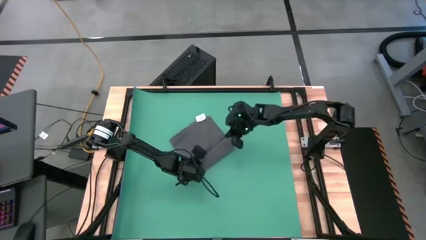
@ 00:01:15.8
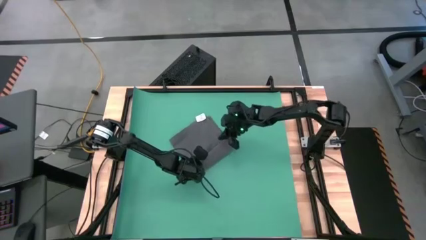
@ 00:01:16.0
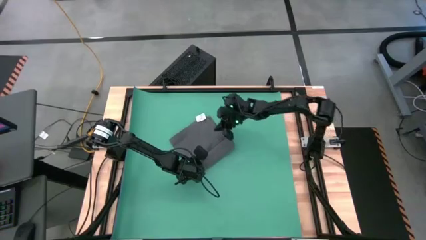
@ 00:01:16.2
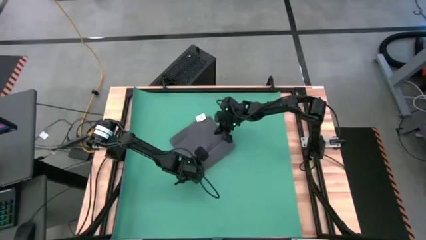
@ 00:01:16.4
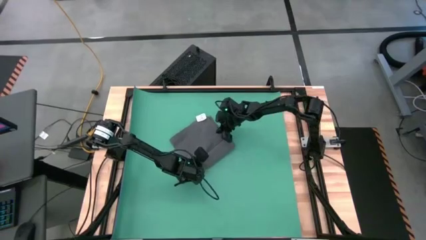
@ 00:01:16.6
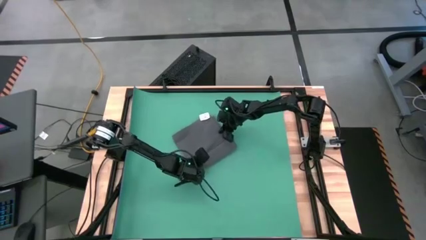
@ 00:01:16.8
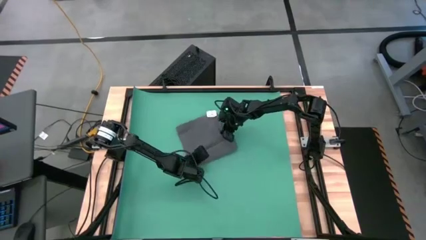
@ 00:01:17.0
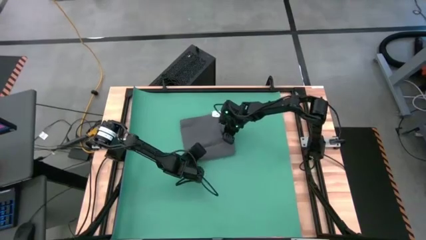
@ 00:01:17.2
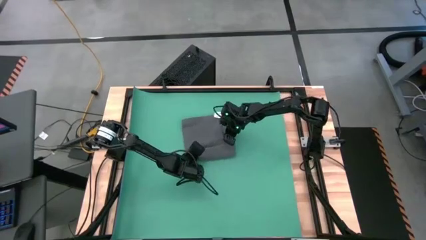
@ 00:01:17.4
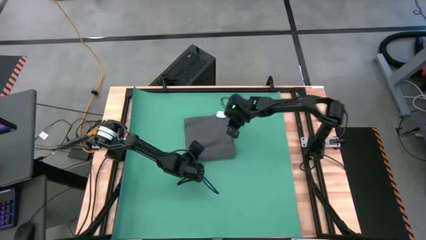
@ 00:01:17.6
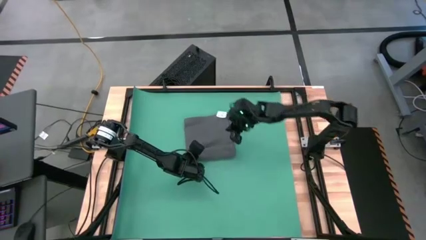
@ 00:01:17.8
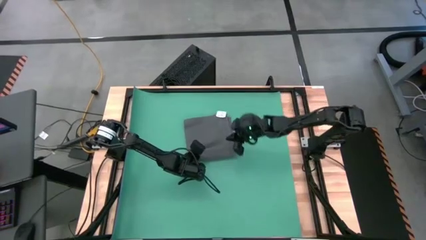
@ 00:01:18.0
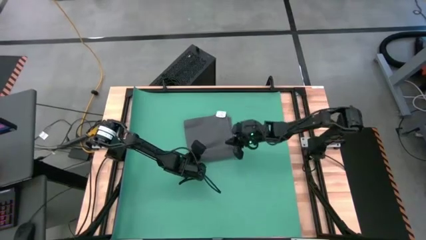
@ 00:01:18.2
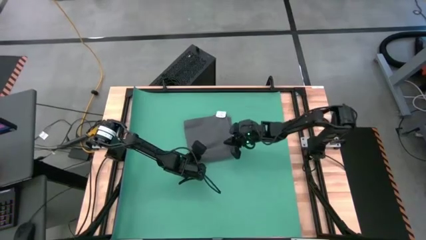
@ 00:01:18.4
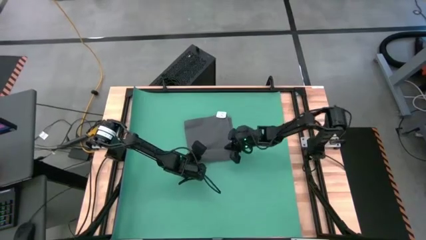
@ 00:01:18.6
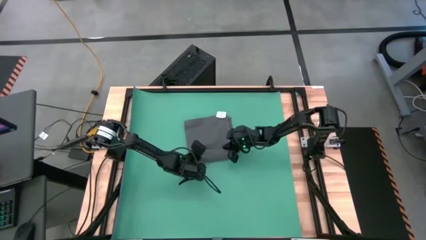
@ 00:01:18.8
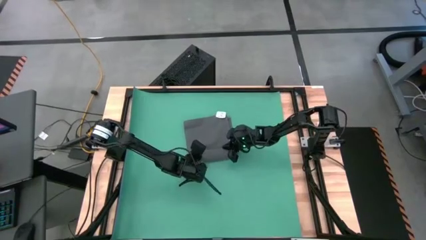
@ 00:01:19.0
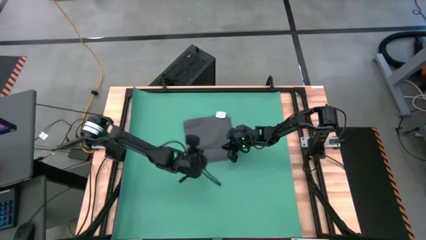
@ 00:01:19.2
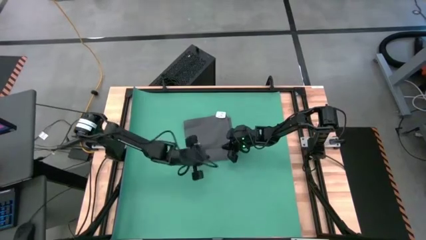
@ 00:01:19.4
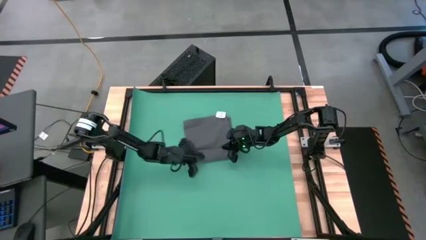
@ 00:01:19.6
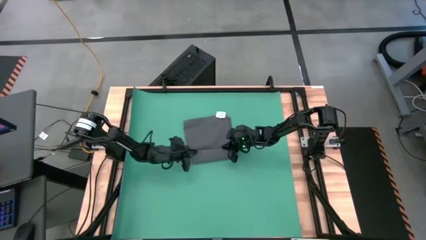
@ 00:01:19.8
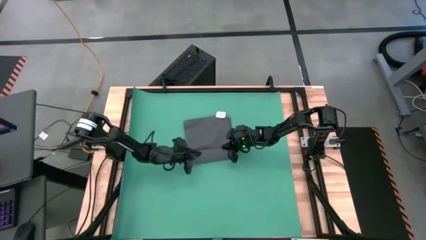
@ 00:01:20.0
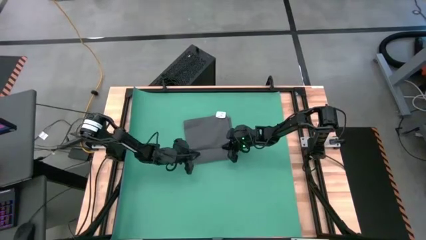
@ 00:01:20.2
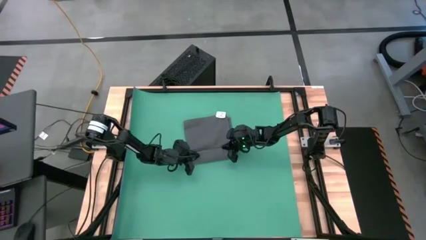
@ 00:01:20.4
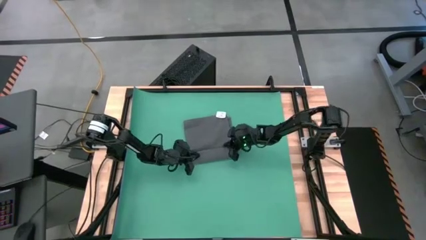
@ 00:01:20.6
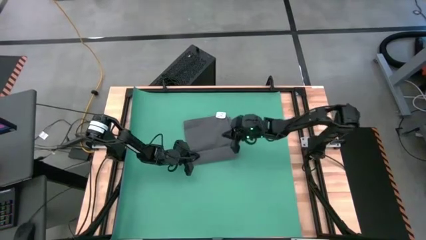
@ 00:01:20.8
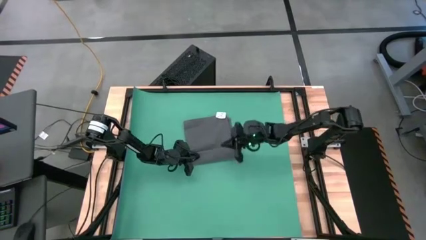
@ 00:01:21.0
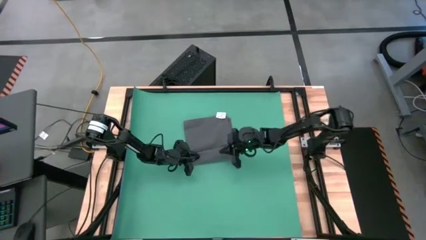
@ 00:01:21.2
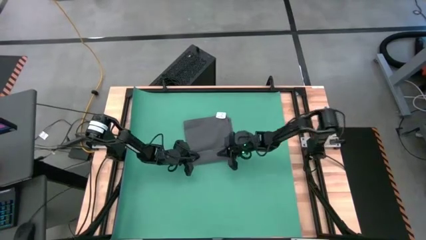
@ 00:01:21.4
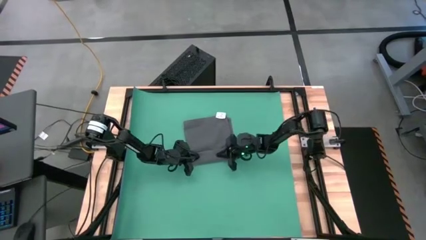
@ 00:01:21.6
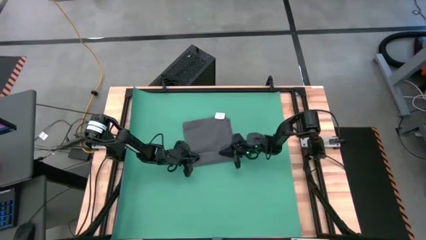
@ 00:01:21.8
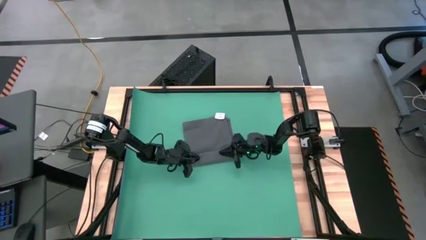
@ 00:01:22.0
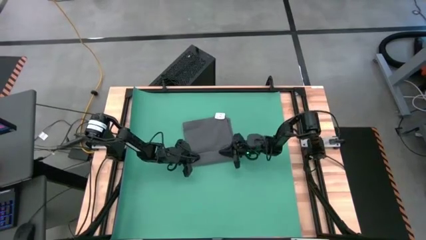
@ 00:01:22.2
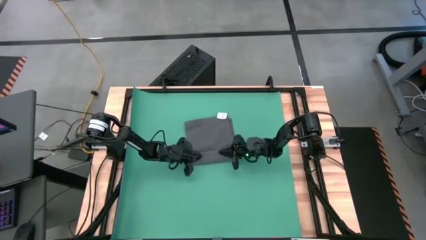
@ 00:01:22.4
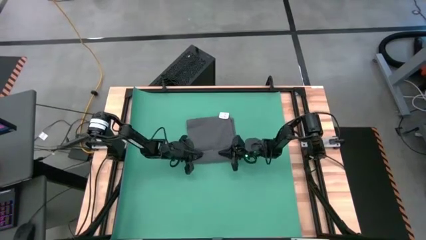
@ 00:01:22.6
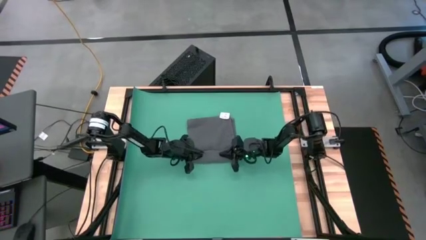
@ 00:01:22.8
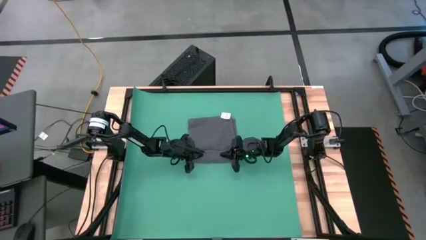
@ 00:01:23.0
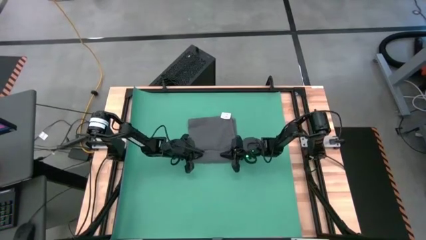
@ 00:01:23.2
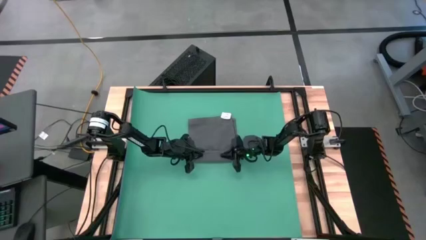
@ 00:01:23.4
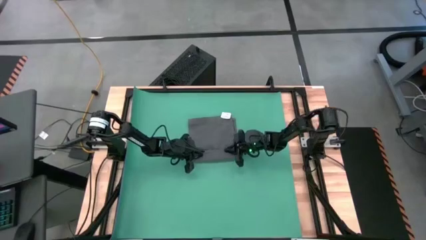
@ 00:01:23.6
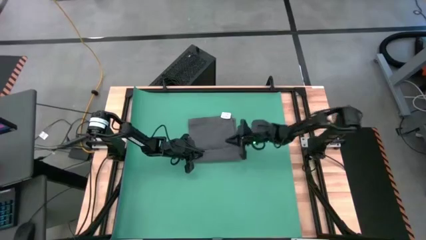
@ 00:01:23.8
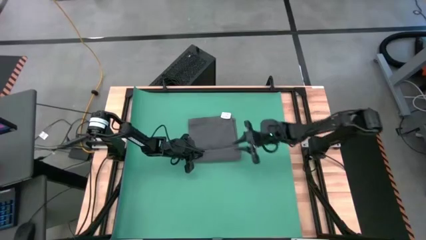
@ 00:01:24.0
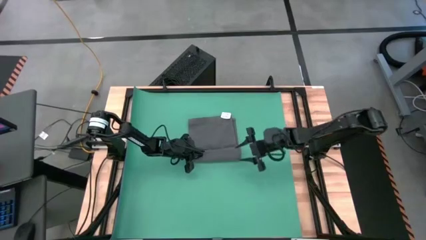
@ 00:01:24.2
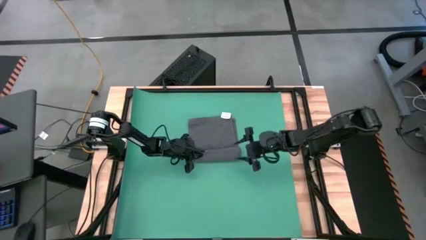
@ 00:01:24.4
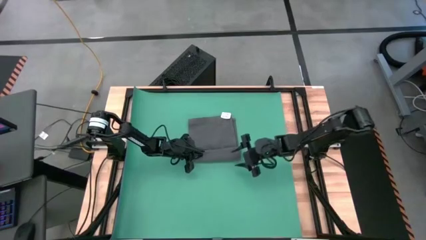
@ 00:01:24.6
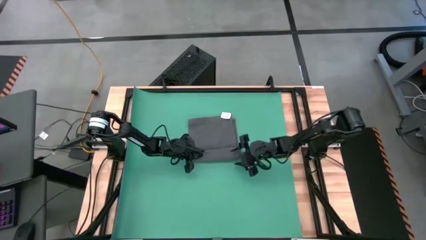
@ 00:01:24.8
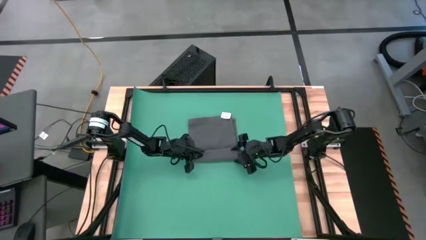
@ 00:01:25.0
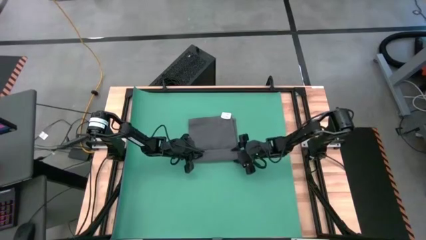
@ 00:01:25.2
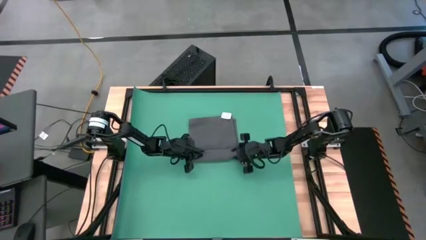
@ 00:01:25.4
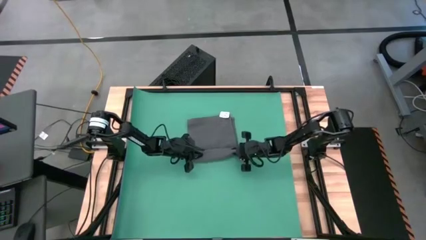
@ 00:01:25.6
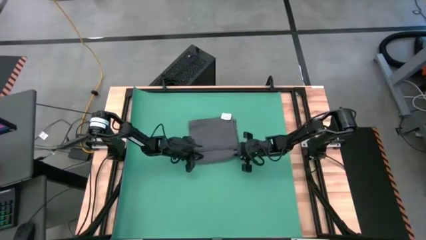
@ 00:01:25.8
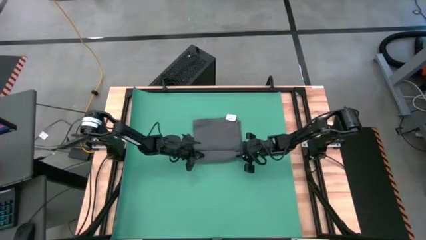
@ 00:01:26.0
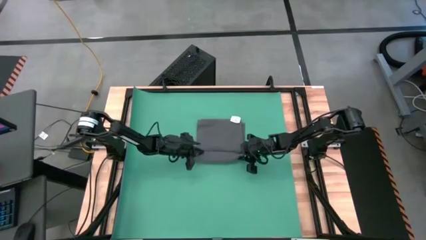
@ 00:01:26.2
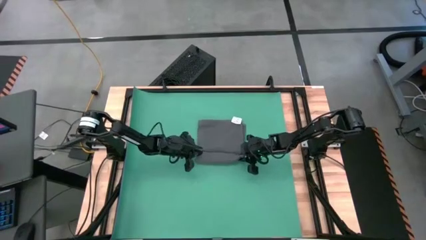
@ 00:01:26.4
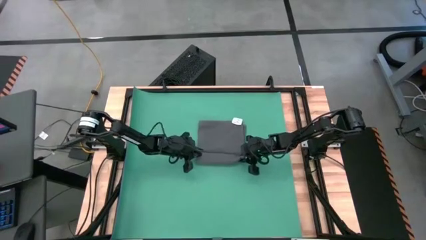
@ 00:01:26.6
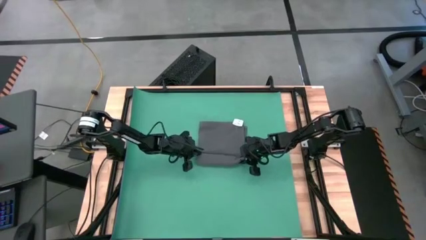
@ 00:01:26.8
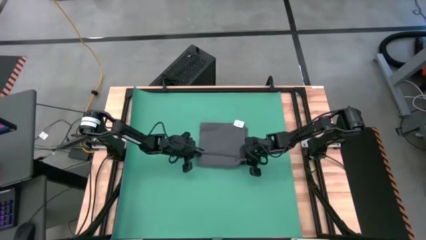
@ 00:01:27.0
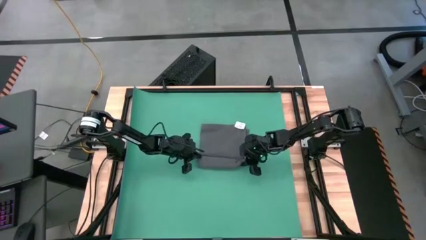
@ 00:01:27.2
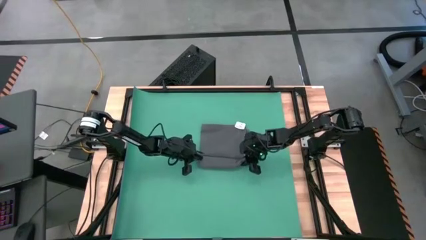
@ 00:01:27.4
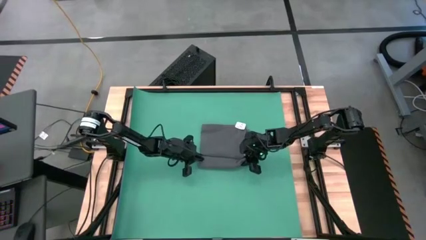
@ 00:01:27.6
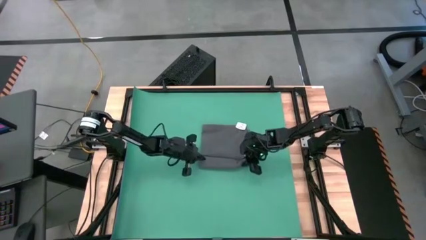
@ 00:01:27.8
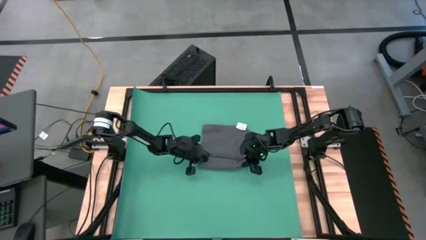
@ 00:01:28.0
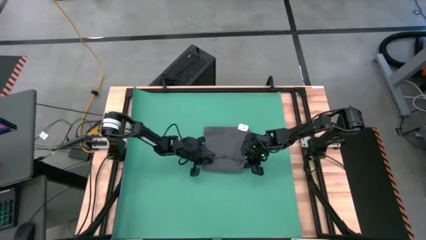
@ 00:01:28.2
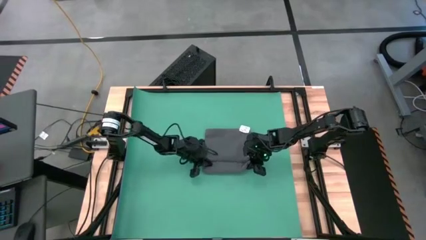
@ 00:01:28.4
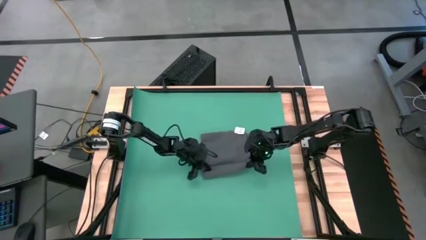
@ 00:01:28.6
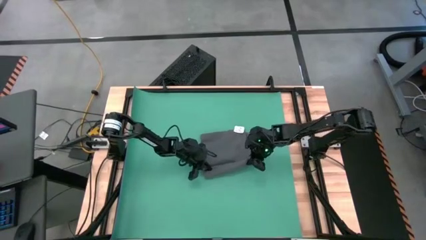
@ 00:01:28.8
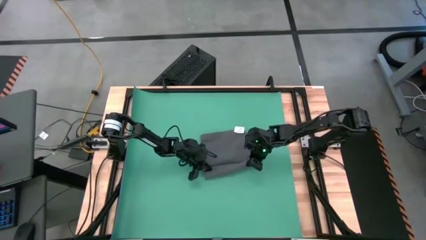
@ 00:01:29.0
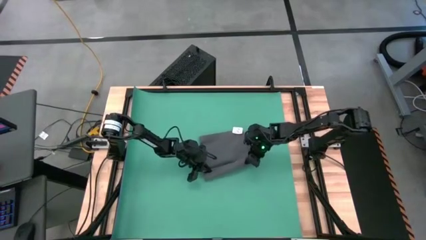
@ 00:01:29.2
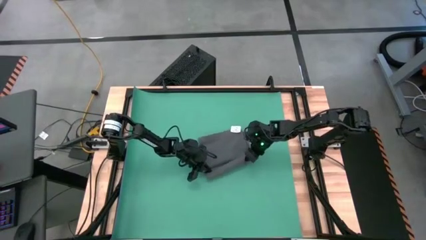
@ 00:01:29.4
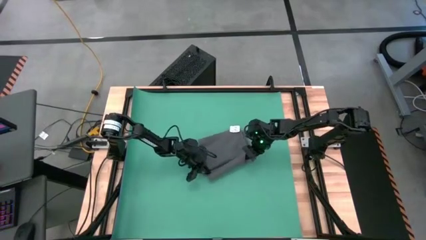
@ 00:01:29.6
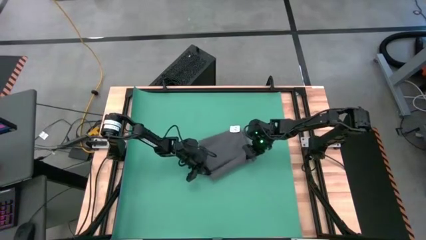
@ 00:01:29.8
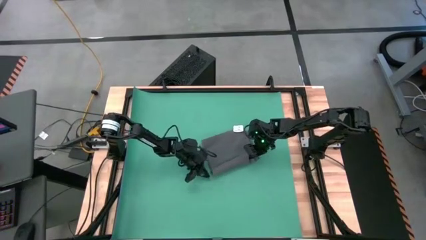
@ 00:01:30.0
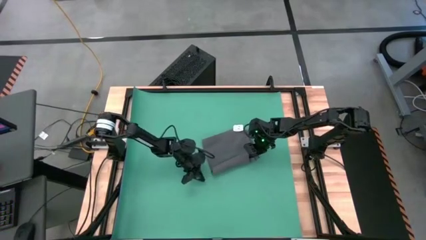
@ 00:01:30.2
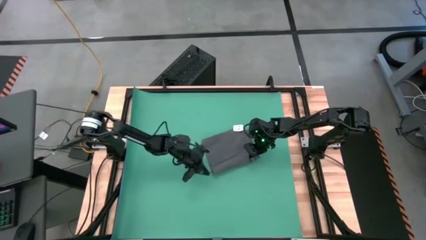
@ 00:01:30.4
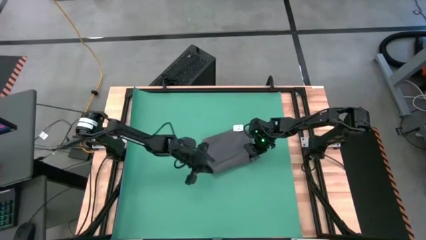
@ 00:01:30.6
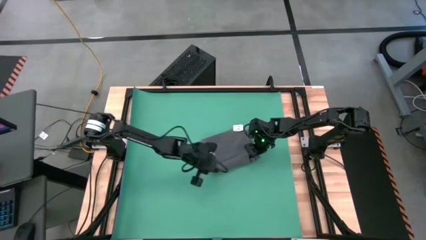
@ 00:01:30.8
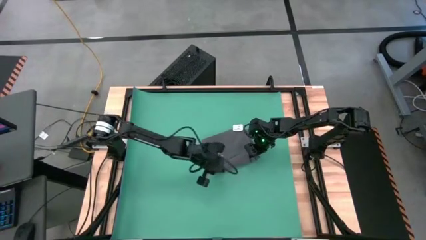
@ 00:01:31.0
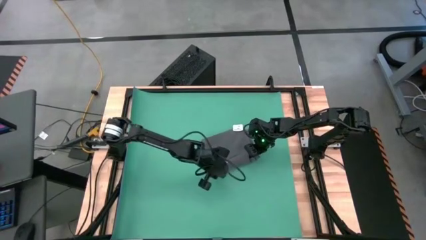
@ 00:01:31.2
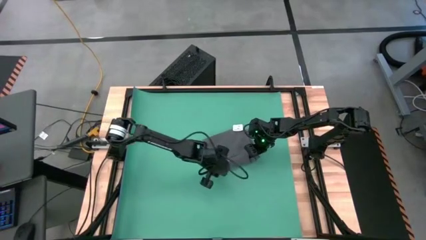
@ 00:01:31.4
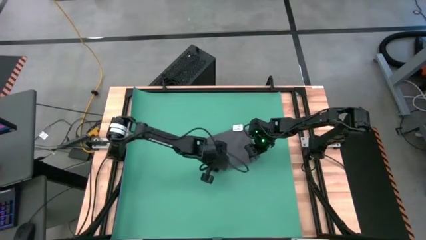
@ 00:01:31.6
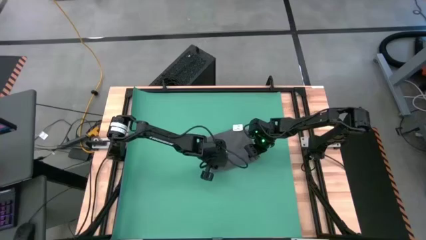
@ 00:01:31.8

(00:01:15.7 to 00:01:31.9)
Task: Roll towel
Roll the gray towel
